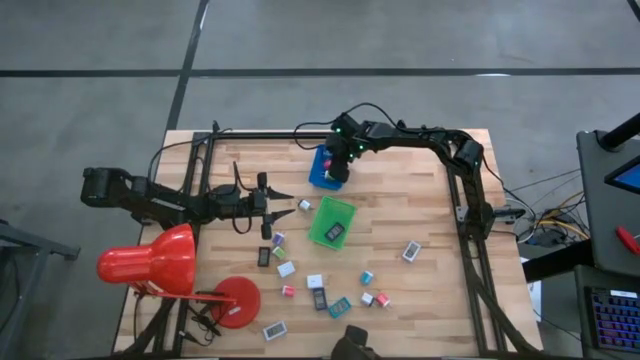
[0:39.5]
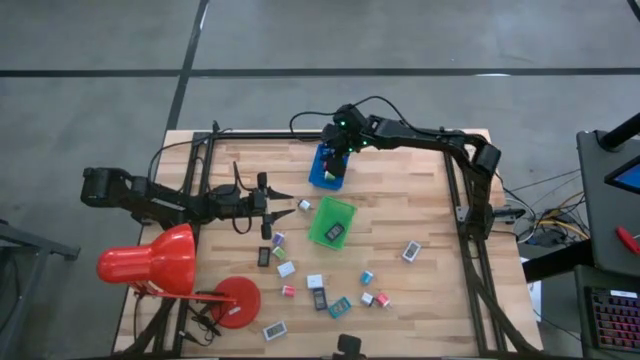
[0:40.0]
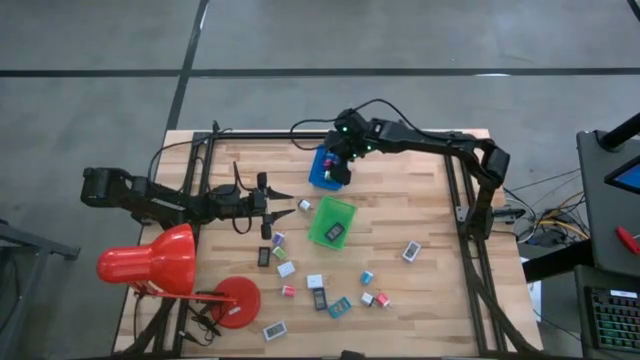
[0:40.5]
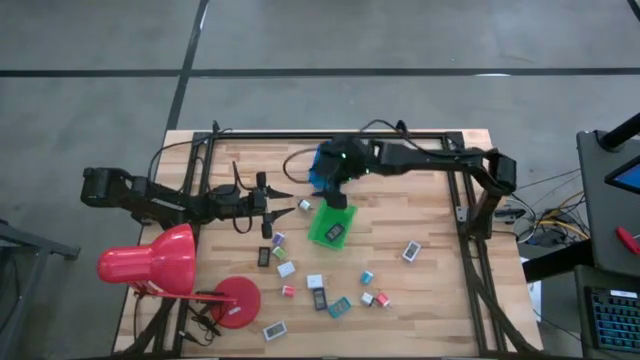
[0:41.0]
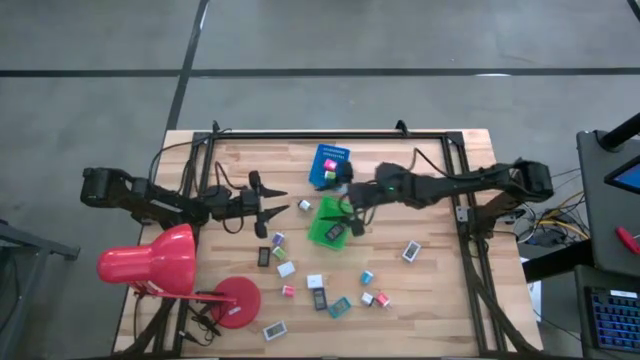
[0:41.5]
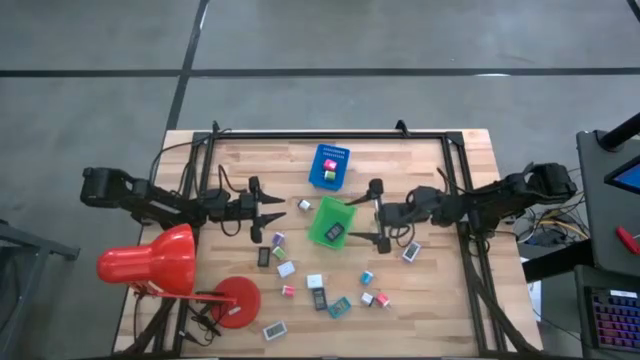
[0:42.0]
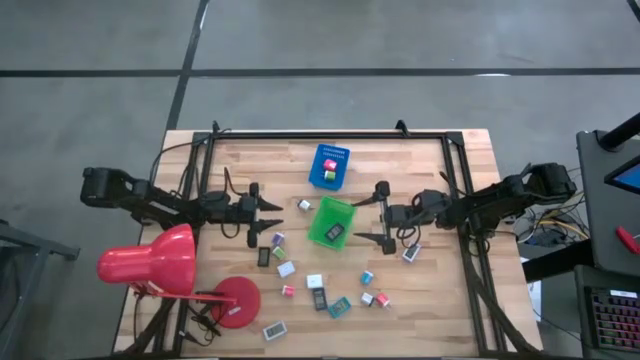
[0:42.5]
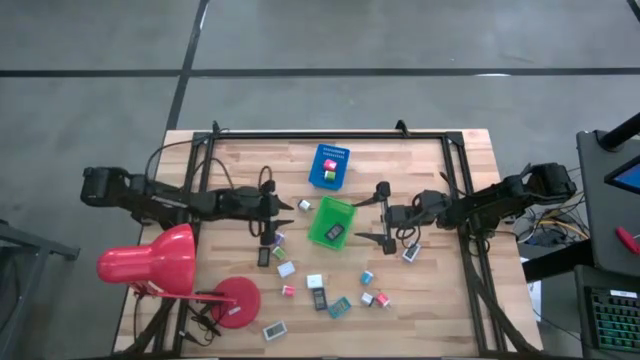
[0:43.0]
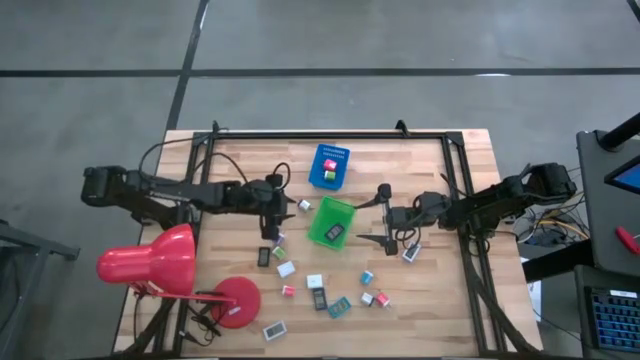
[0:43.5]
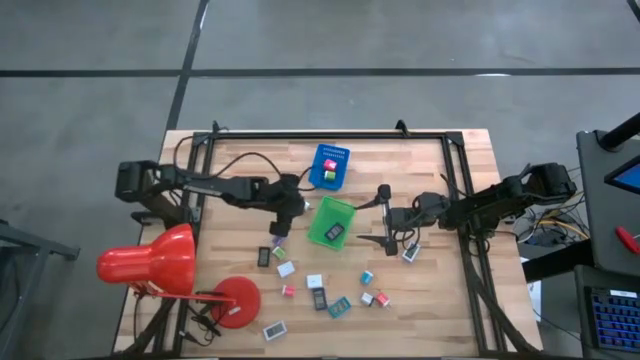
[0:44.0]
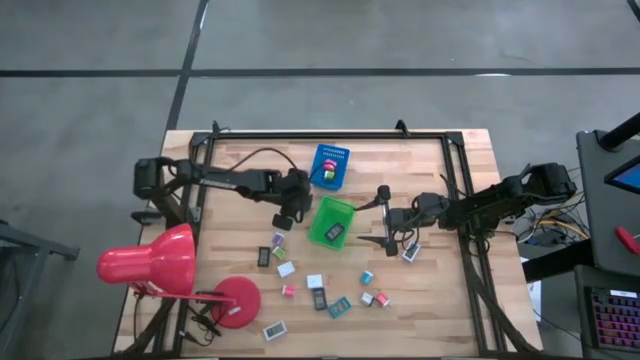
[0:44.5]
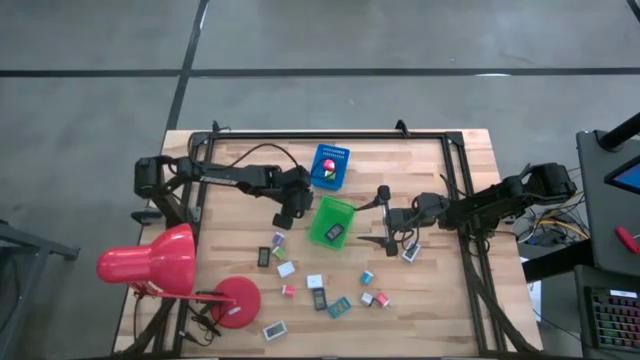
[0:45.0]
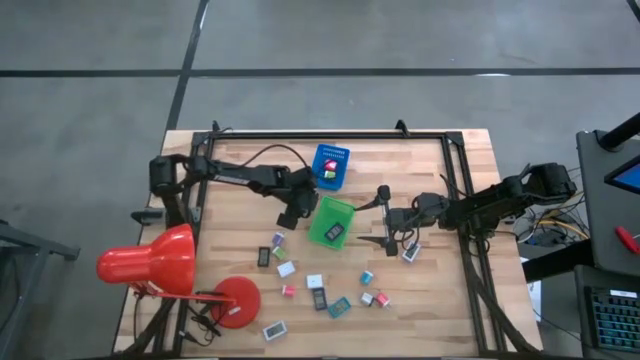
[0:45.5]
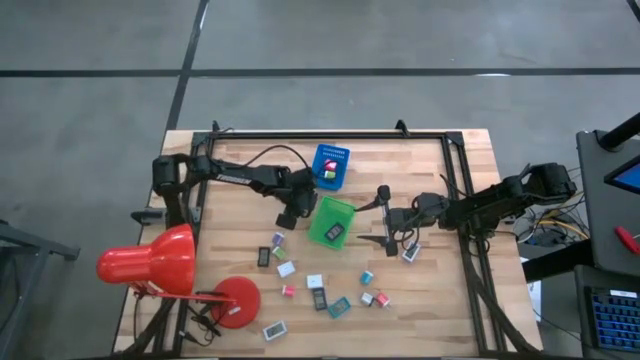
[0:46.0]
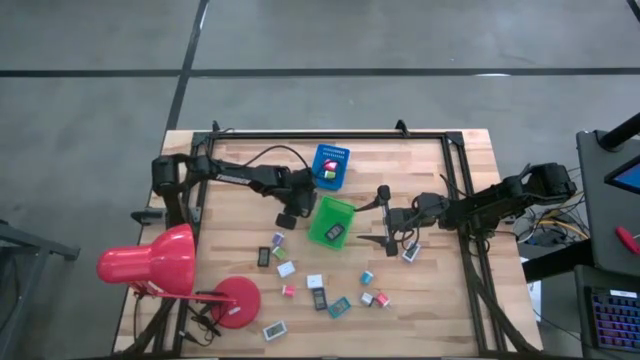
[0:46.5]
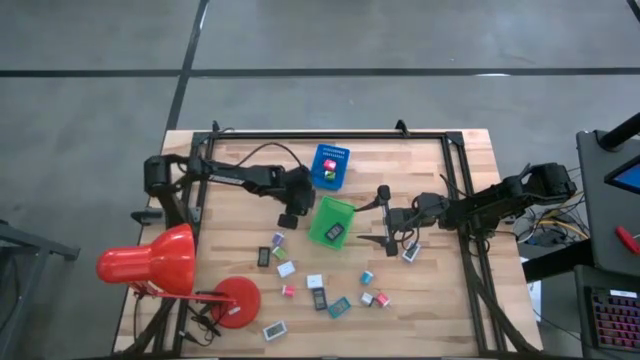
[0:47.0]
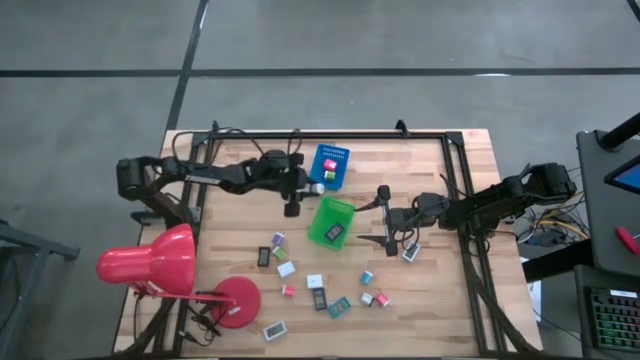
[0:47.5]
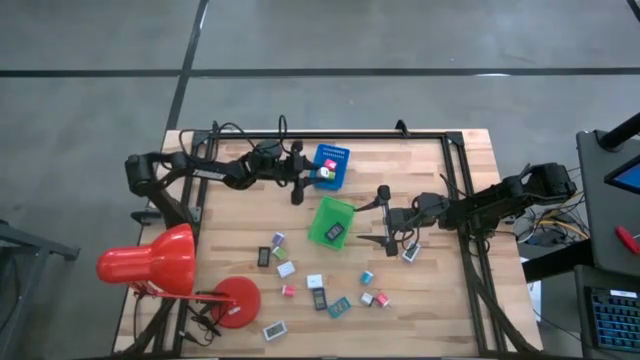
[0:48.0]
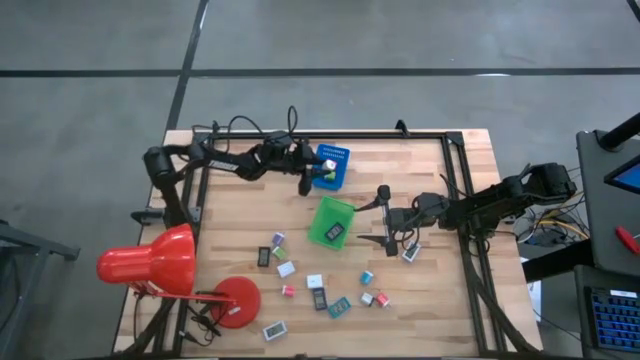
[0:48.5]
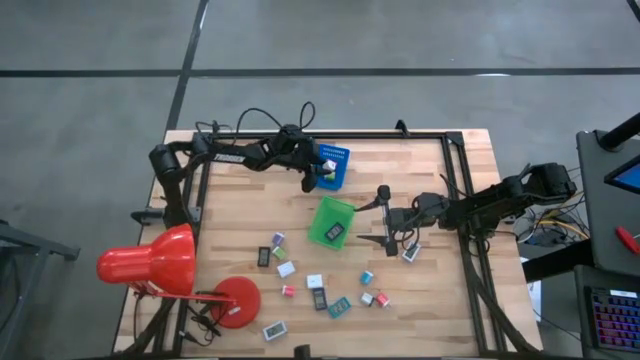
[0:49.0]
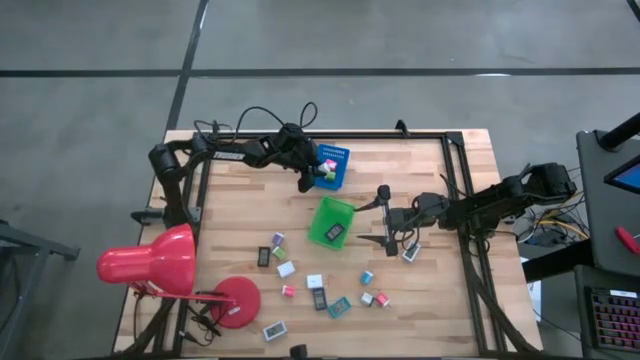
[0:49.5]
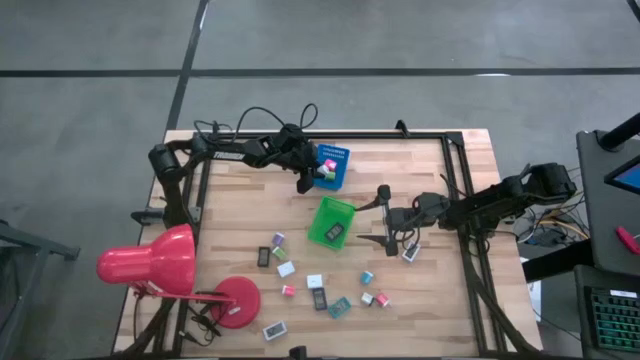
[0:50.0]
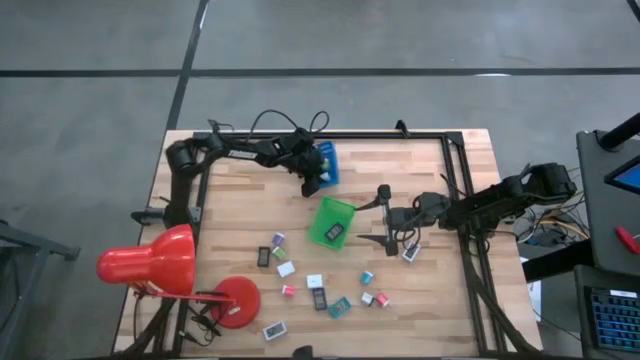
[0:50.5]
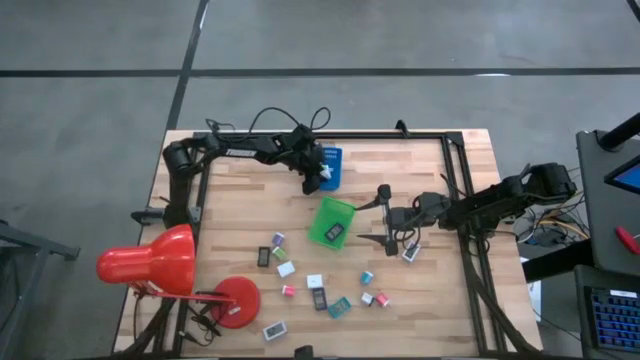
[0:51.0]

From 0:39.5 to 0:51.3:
Task: Pick & Place Office items
Put the top small white charger adapter into the blue bin

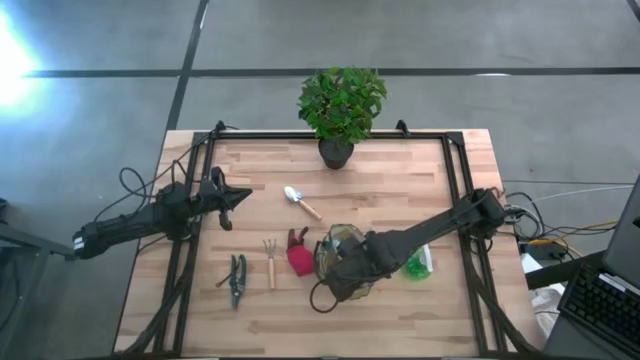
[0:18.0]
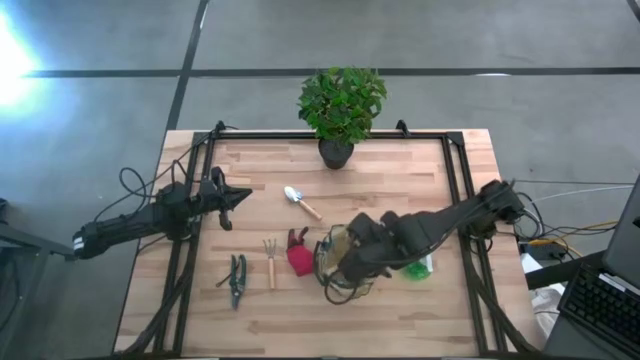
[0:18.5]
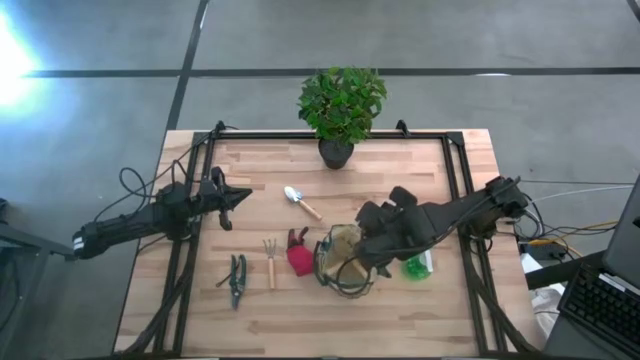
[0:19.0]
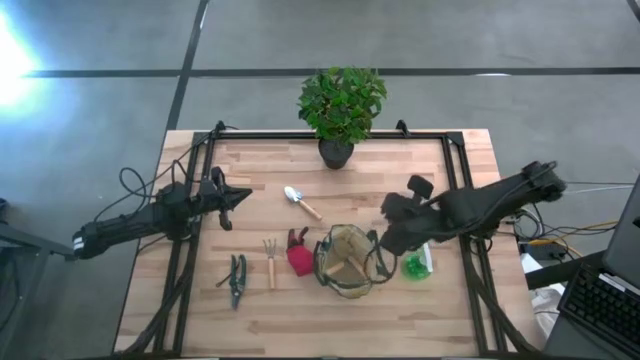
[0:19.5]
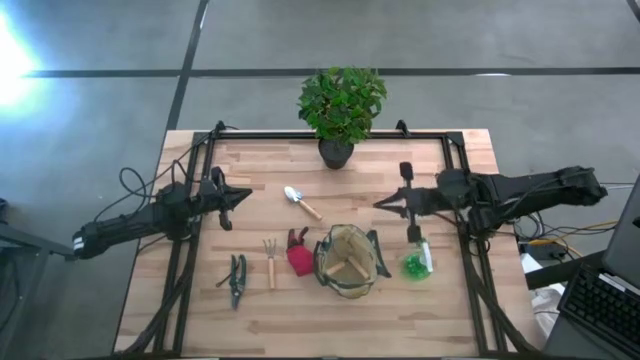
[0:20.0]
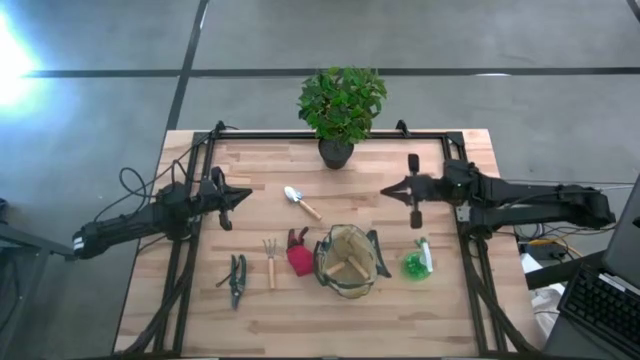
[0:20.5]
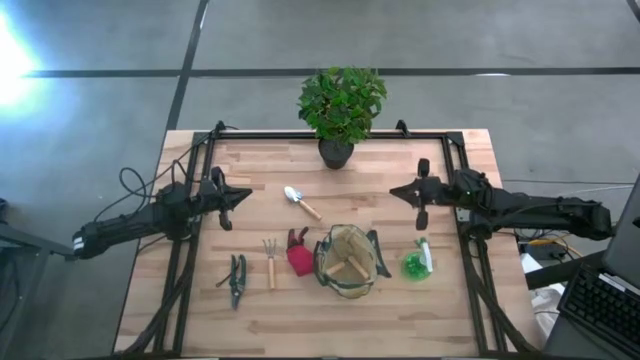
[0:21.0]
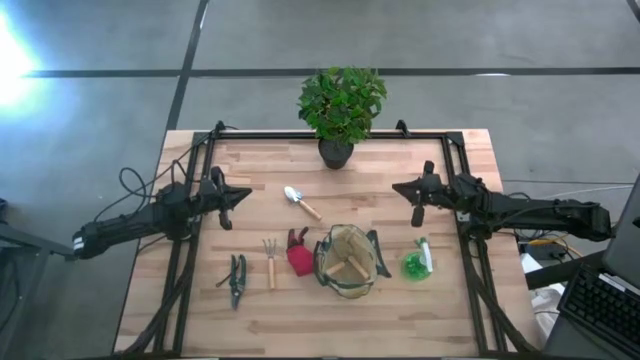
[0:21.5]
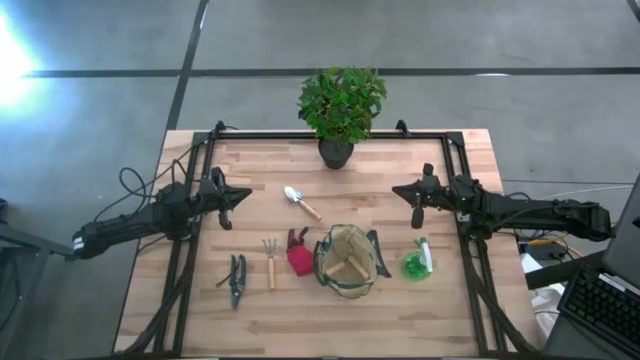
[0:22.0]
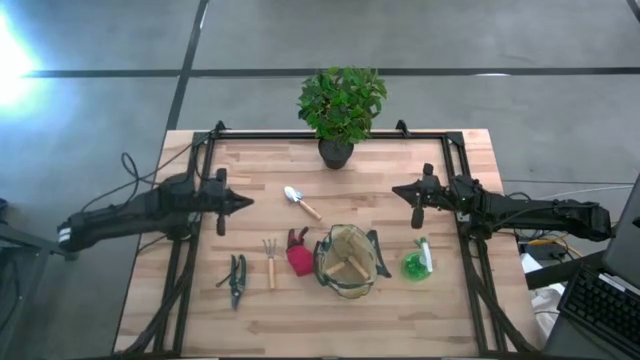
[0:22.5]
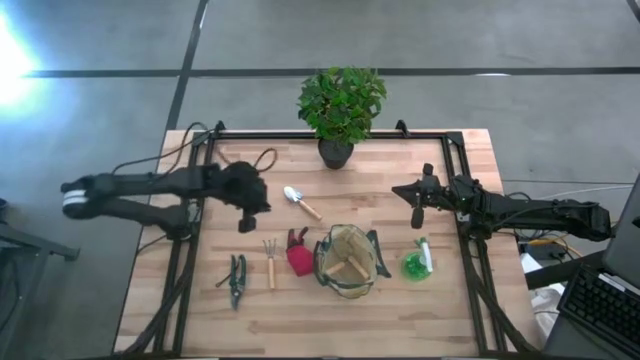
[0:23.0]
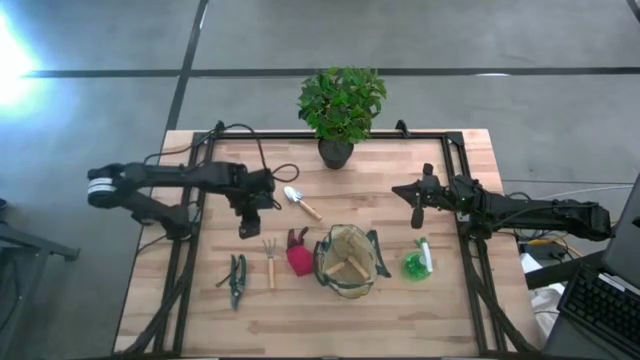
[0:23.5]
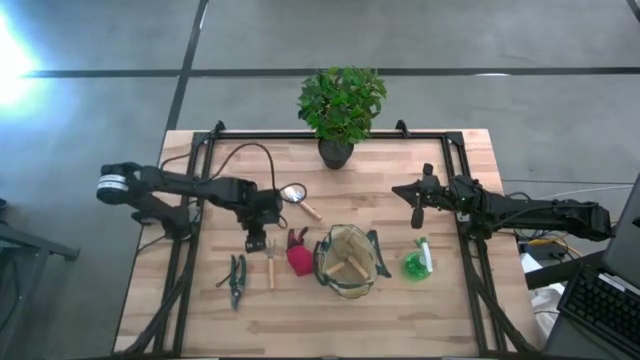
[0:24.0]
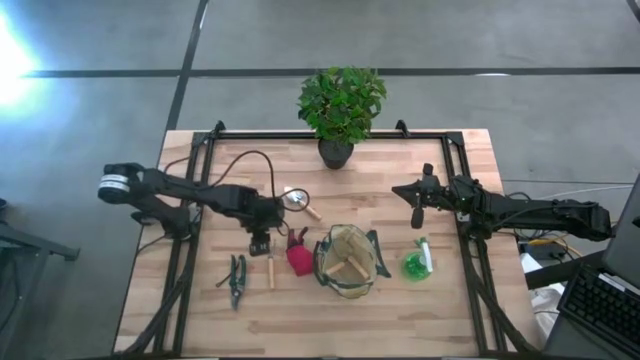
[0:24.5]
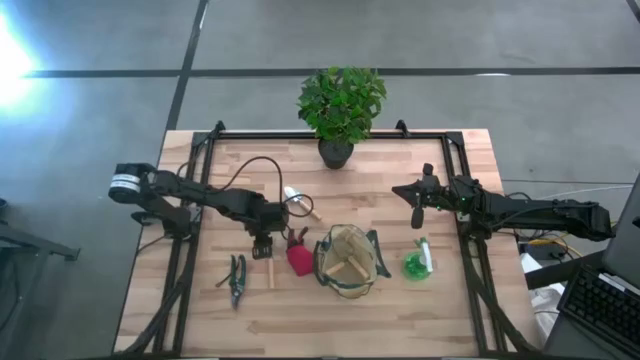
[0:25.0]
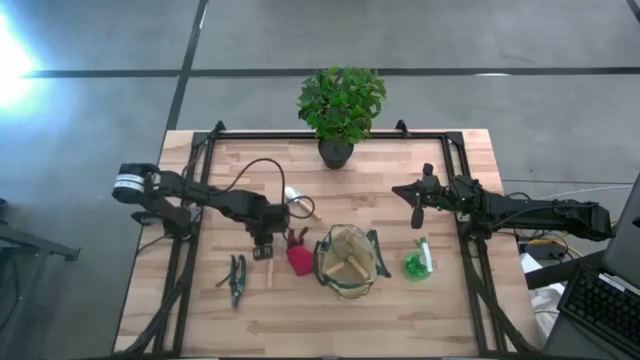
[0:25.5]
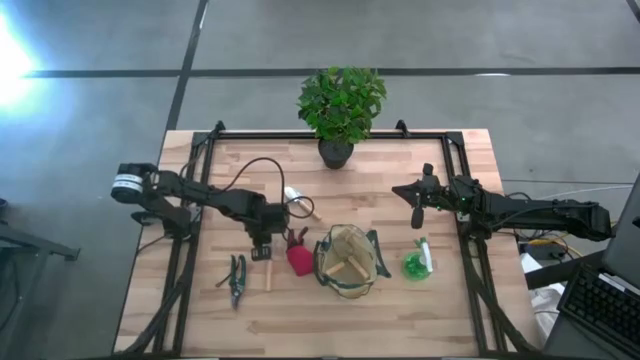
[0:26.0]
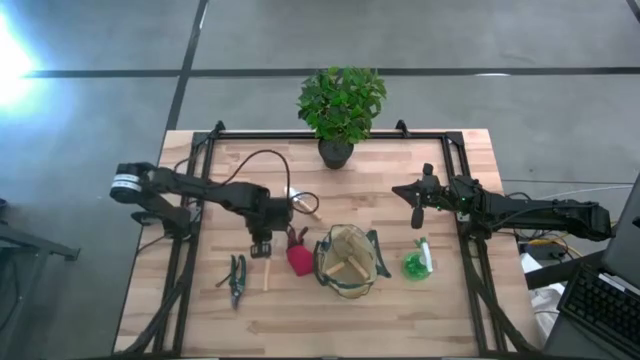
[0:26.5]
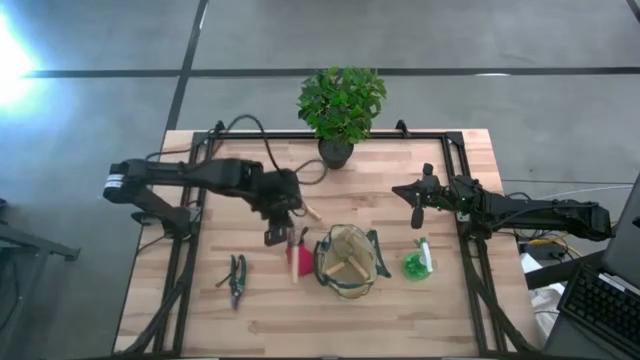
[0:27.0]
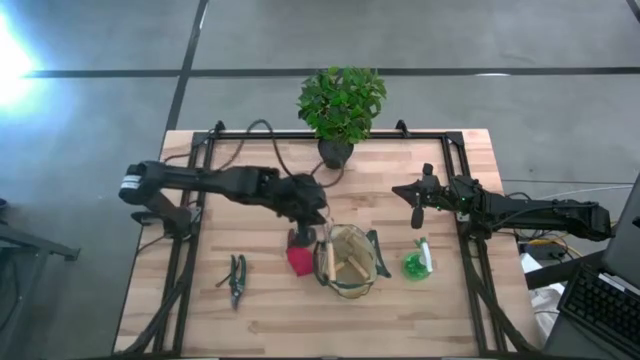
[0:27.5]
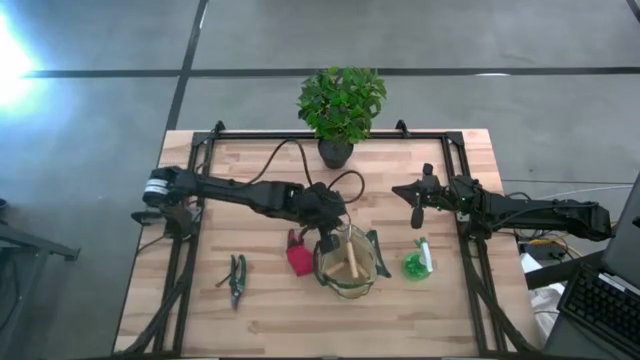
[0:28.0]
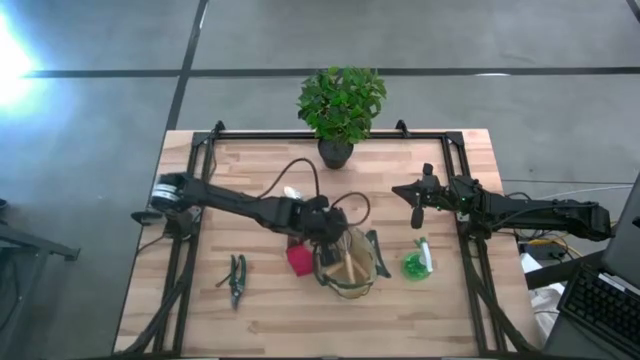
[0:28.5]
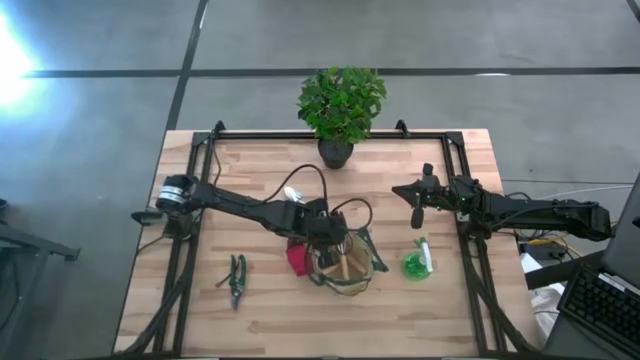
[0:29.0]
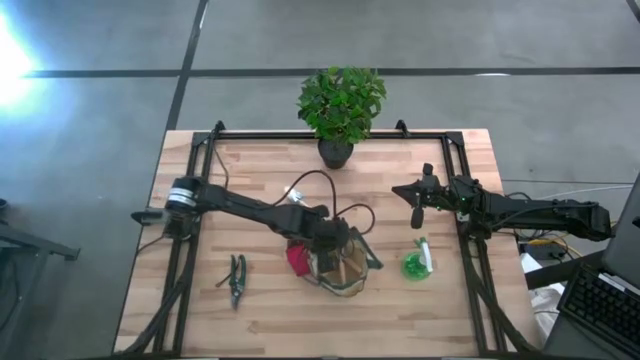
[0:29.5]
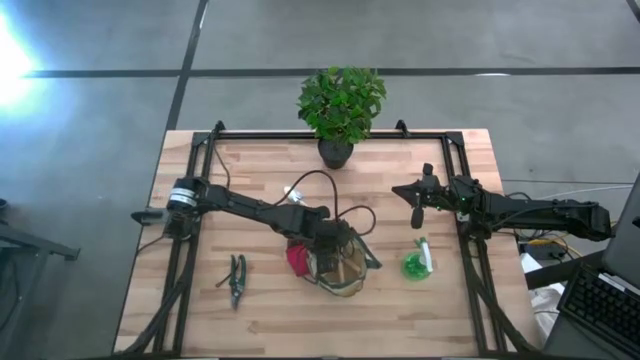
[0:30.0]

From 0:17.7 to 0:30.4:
Task: Pick & Place Garden tools in Gardening bag
Put the brown hand rake into the gardening bag
